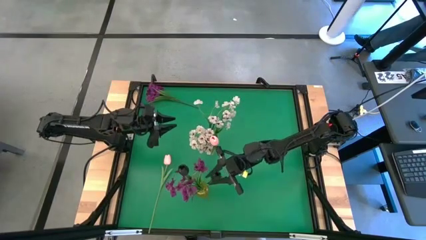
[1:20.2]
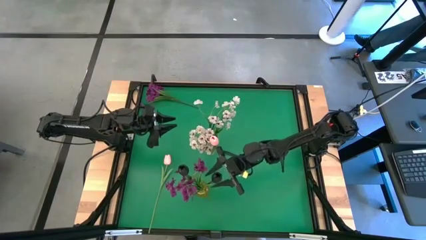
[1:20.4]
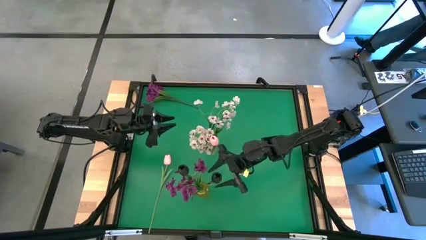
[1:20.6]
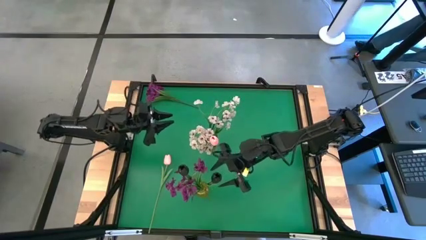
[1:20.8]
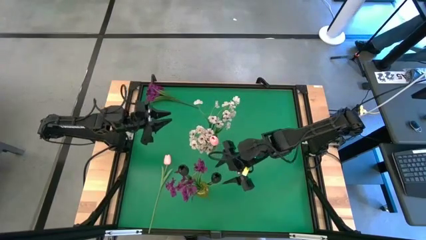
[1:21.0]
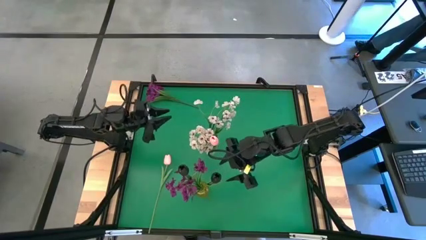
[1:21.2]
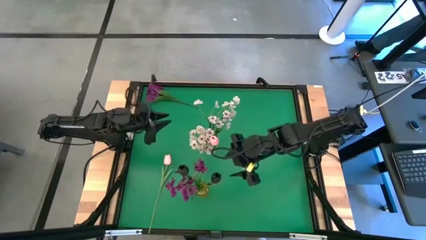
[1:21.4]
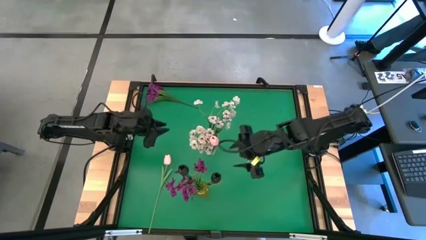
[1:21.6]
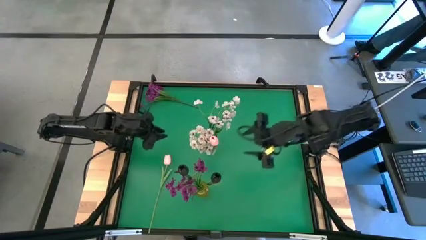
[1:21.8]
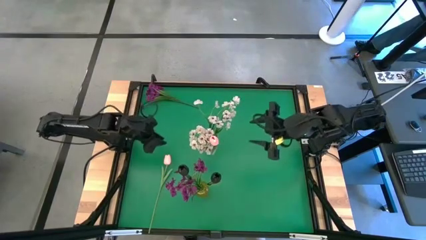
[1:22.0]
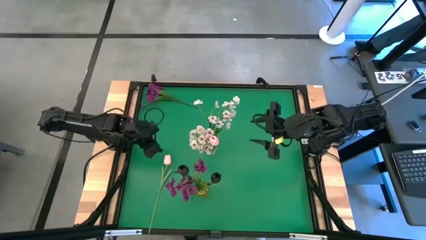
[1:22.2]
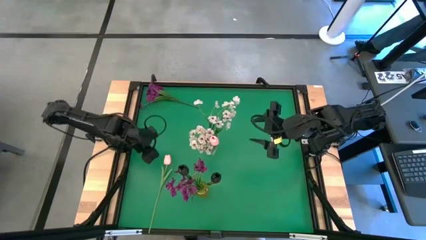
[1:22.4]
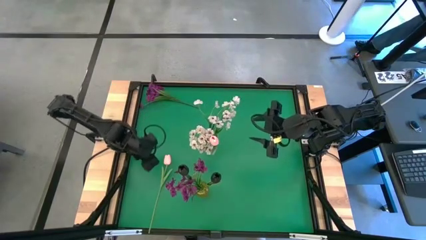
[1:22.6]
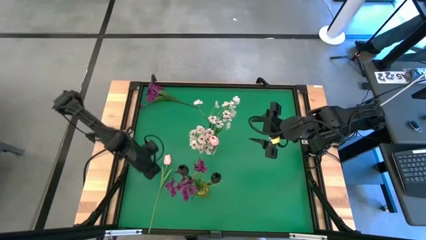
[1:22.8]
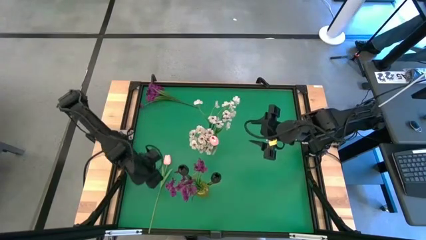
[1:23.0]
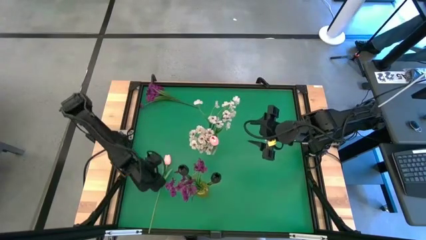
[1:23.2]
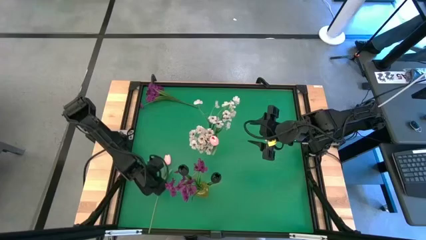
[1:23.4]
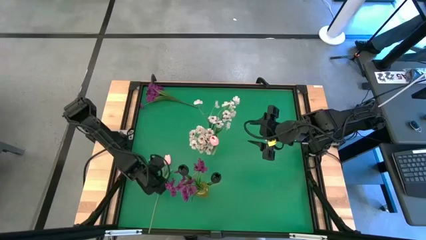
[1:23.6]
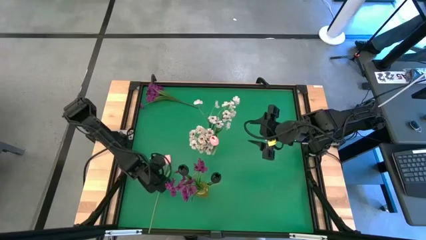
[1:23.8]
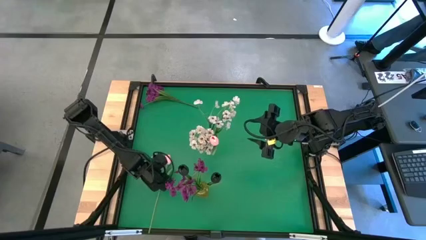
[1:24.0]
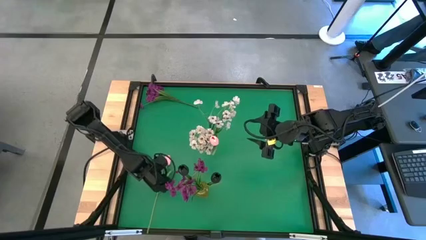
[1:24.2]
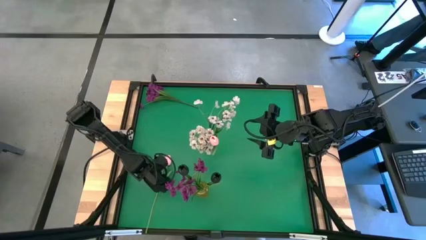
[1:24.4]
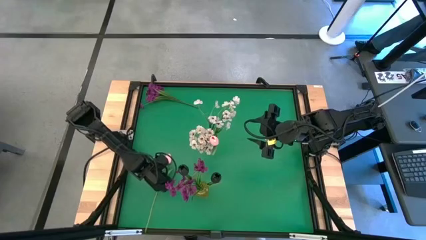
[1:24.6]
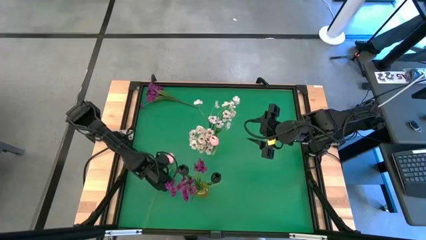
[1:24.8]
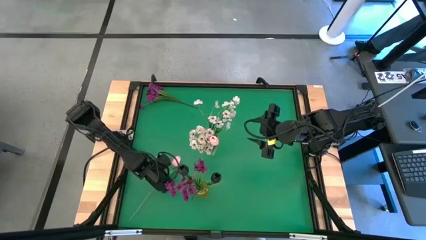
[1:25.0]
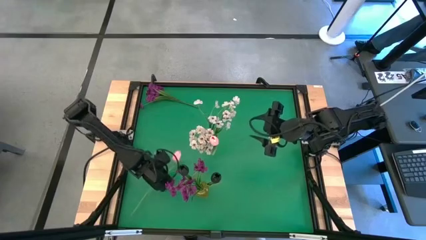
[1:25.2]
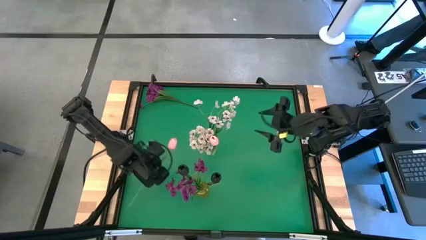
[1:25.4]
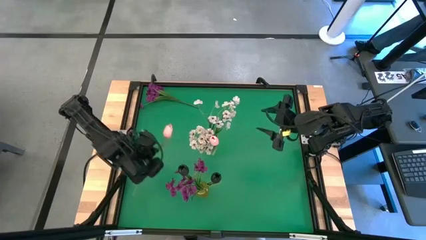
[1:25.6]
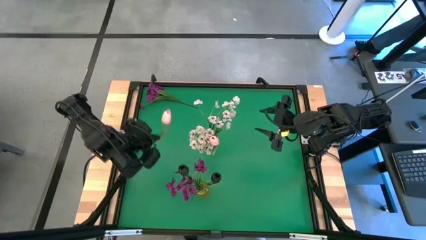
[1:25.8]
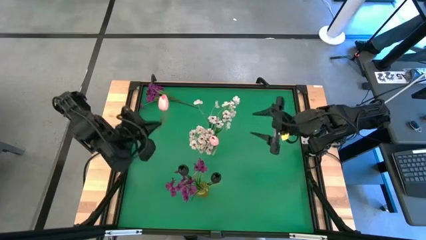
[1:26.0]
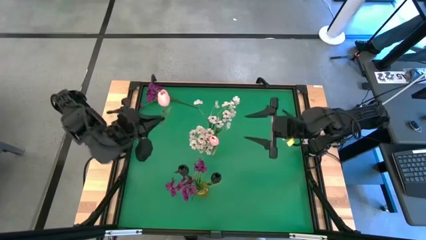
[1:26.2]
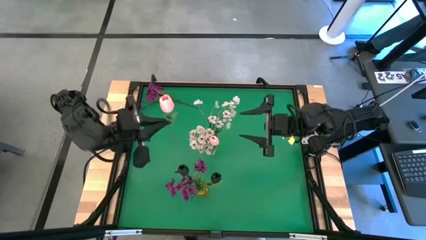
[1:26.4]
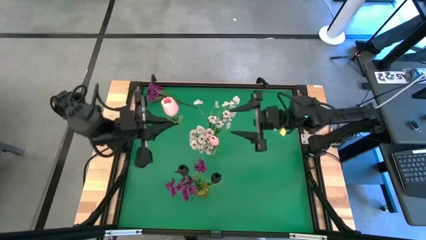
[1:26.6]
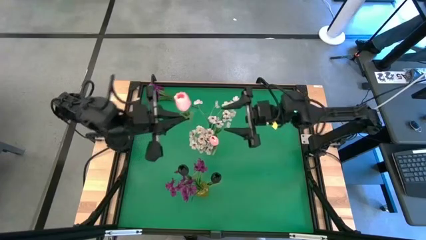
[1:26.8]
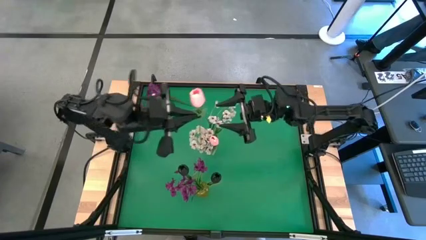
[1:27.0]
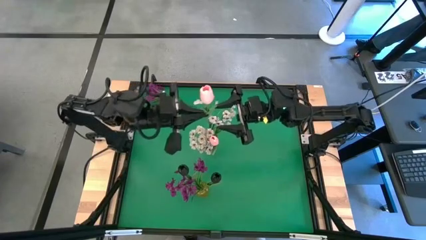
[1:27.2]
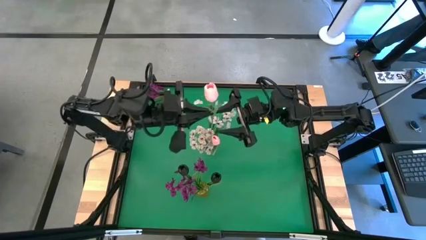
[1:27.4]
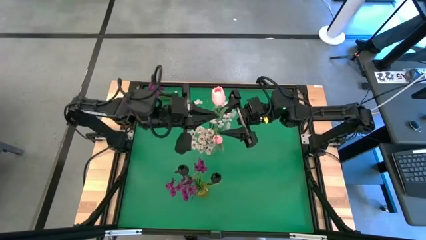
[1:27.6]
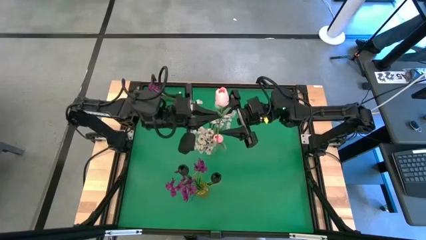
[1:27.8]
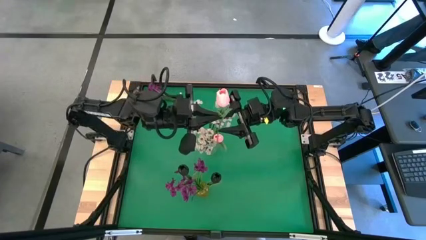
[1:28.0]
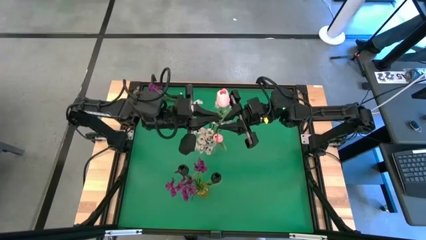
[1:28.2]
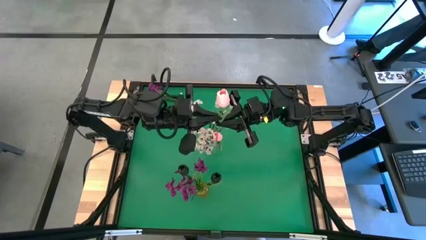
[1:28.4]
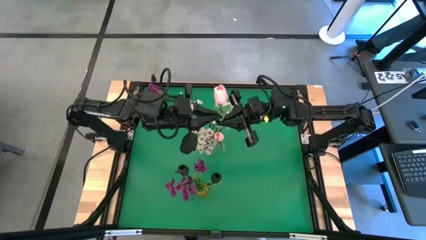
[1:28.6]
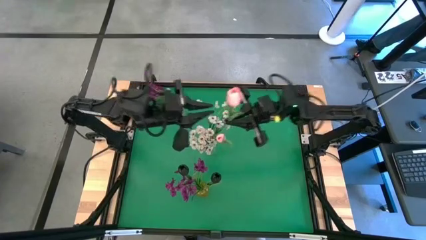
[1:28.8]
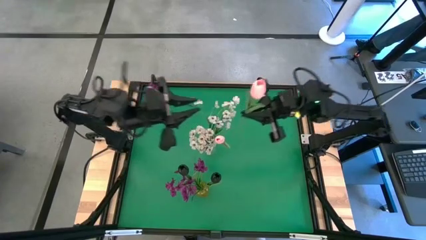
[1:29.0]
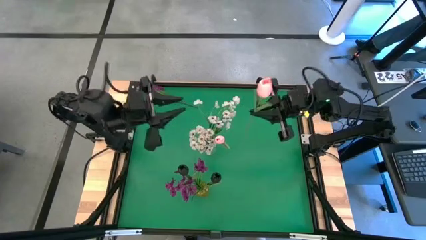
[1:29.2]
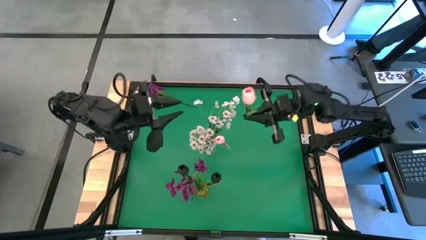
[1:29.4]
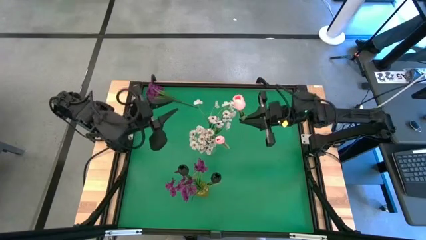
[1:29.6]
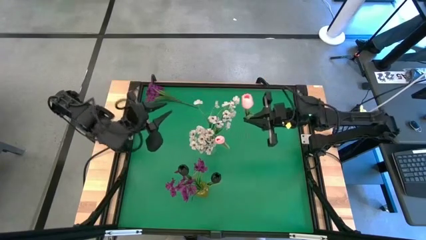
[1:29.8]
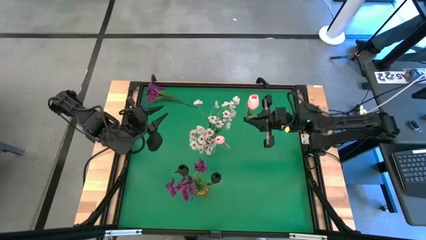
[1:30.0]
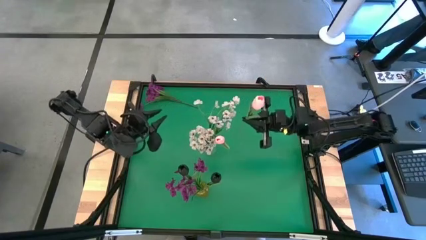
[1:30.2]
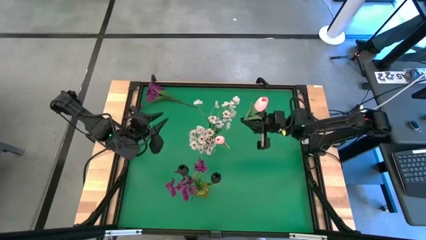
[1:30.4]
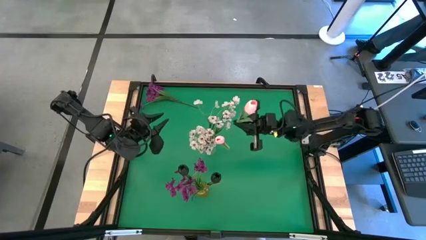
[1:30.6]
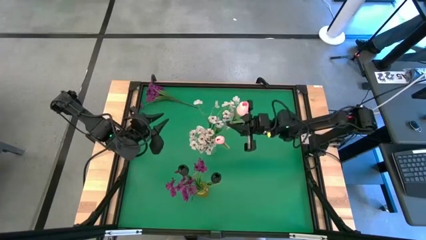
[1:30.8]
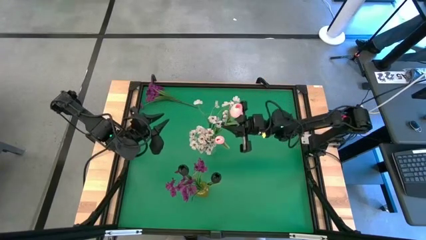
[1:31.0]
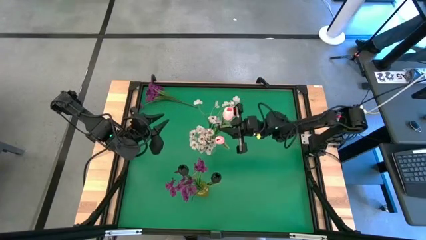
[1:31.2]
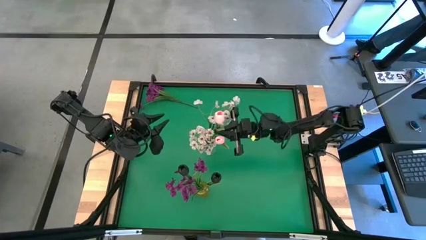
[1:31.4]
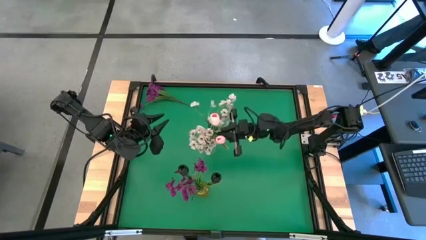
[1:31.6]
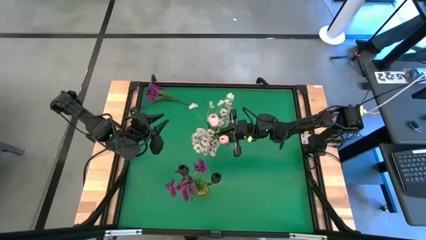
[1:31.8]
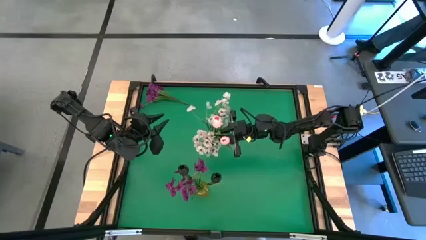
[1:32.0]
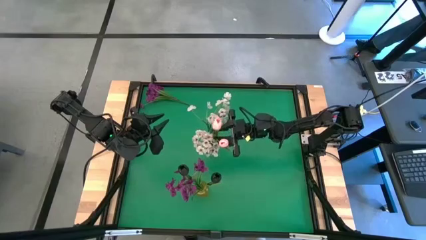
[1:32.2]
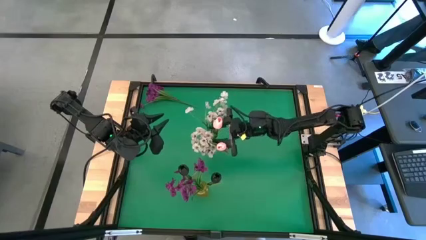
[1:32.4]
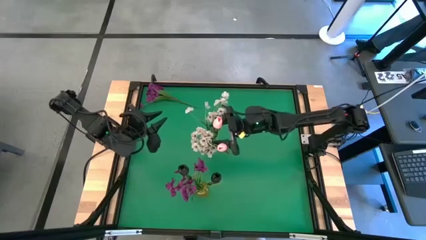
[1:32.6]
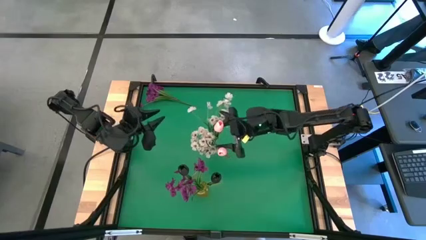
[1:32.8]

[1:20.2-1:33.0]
Task: Sort flowers into vase by color
Put the pink flower into the transparent vase

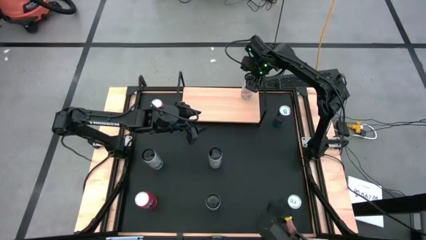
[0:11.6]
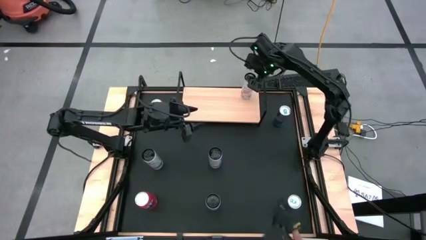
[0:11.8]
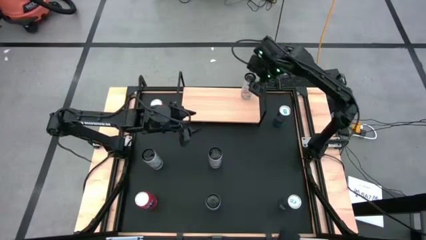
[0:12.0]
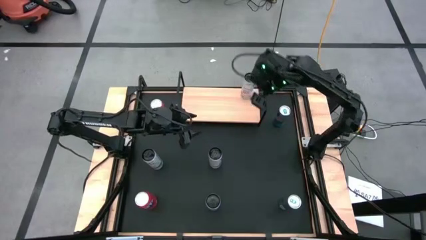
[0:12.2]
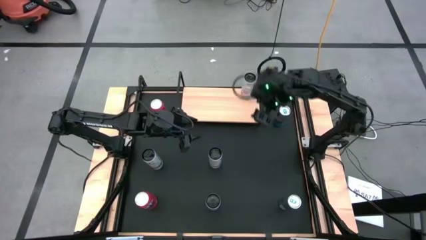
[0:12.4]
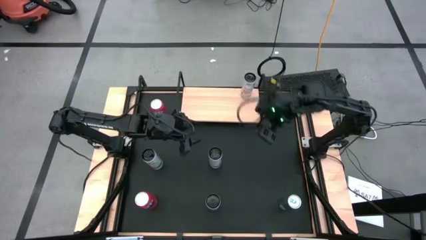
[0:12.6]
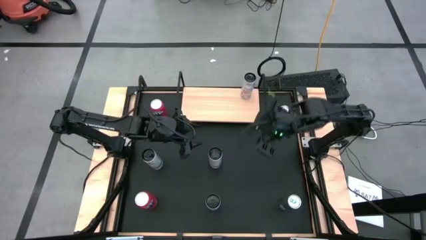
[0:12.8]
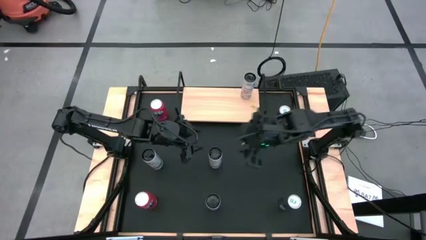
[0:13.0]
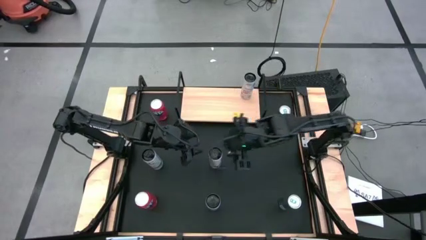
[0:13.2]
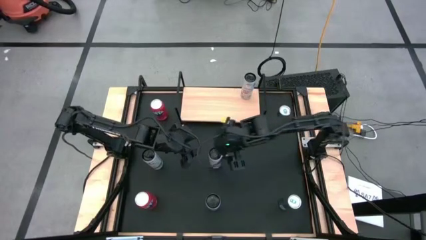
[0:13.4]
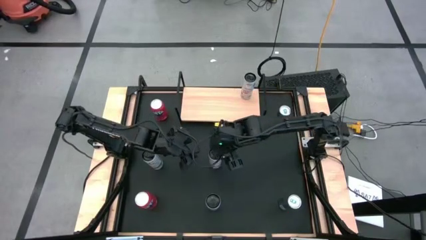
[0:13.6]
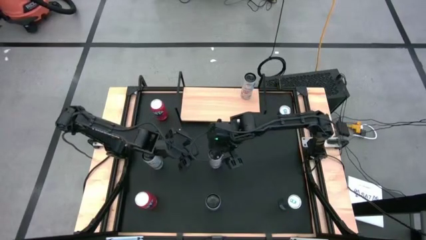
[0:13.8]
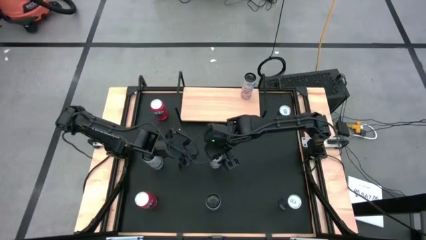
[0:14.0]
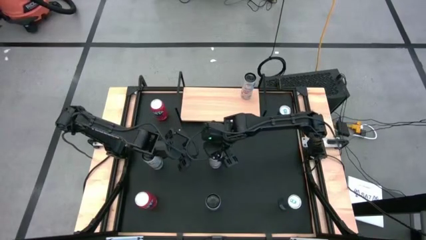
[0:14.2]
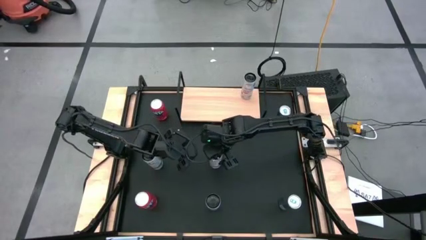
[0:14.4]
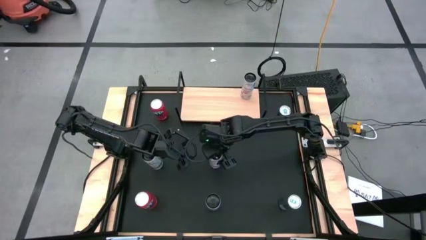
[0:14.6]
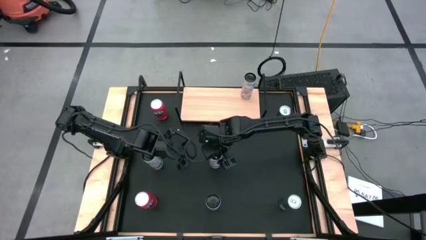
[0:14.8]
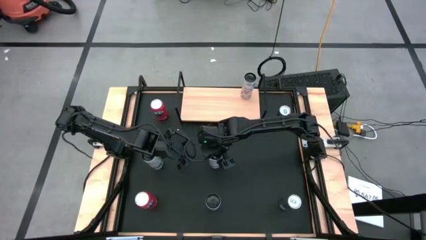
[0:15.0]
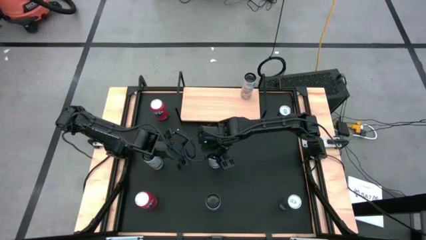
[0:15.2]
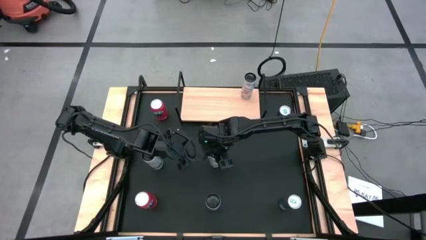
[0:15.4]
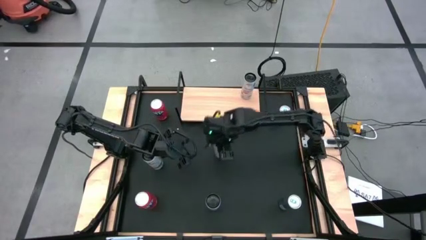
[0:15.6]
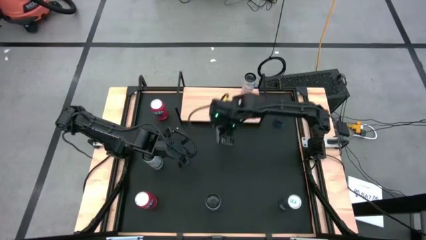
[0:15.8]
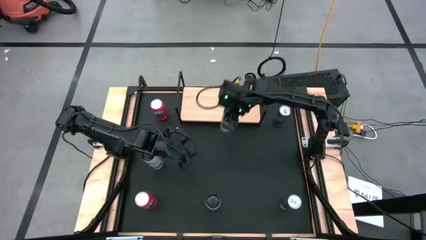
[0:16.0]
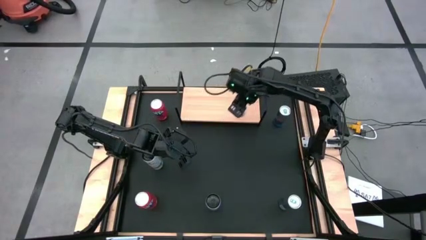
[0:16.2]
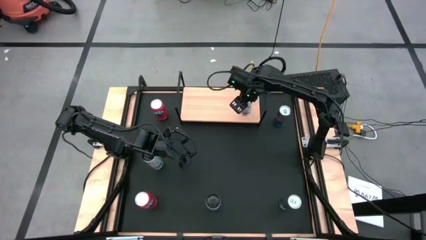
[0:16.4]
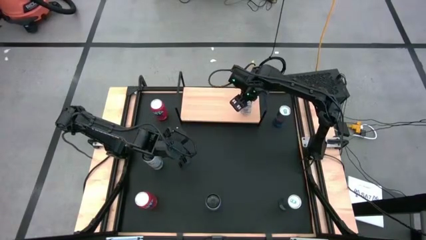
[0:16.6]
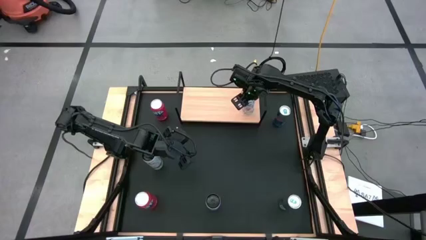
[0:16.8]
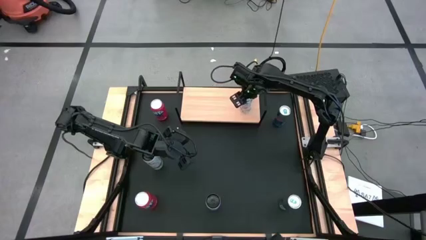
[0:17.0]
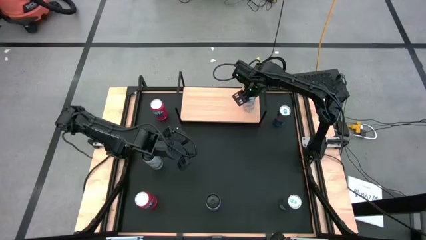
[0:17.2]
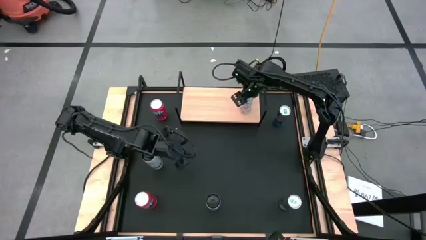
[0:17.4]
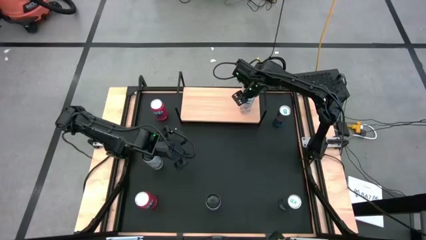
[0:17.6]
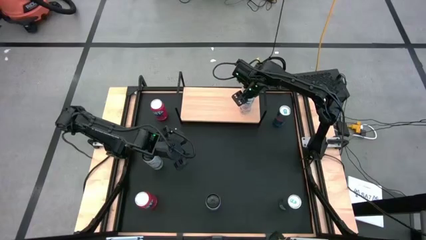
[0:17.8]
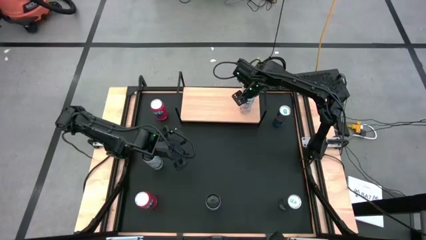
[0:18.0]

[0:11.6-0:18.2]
Task: Place canned beverage on shelf
Put the center white soda can on the shelf
